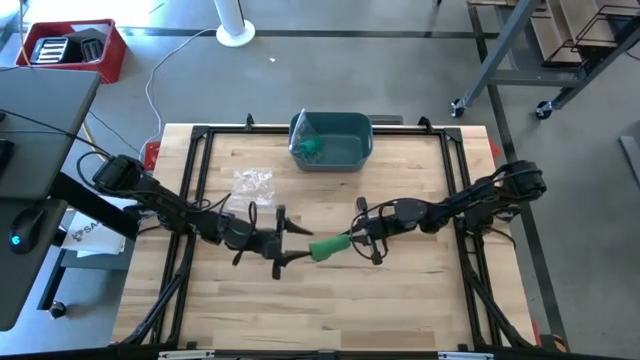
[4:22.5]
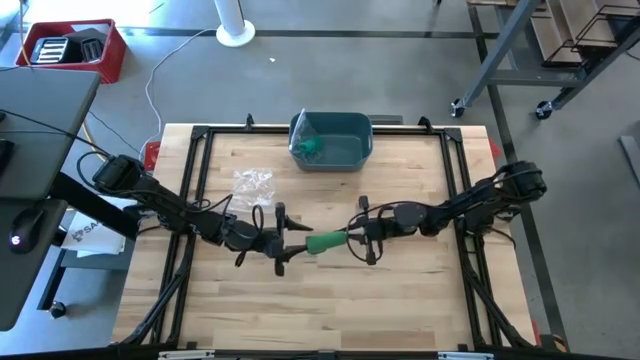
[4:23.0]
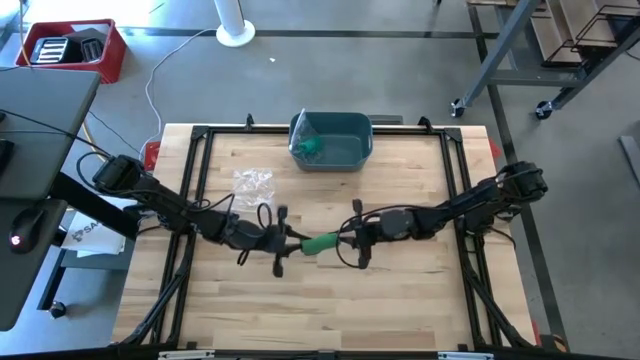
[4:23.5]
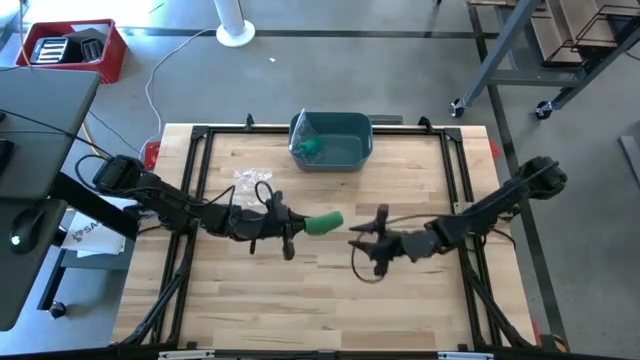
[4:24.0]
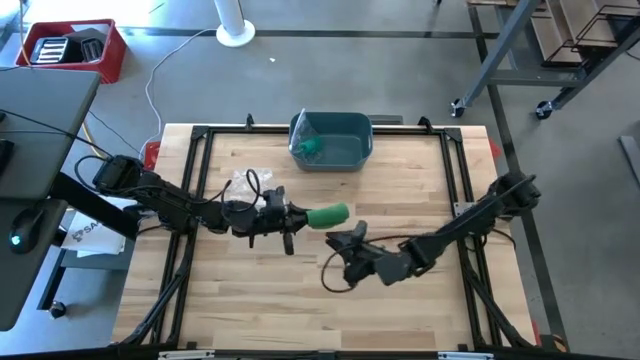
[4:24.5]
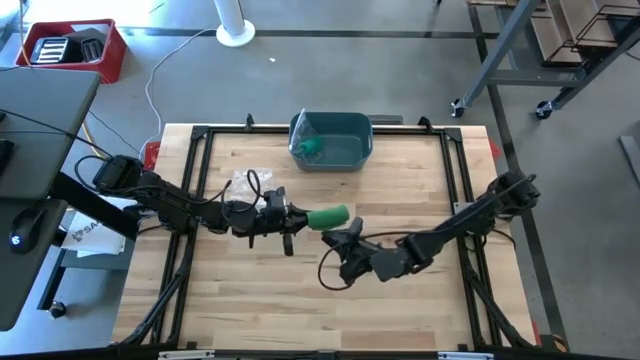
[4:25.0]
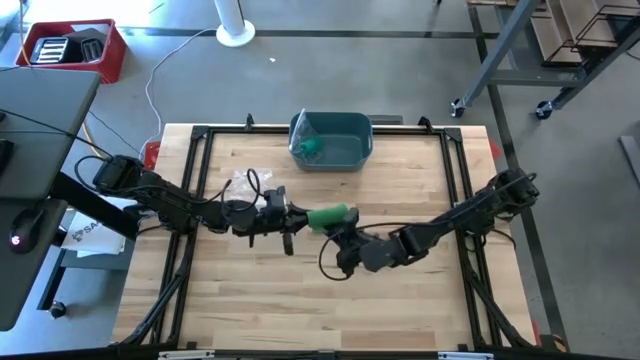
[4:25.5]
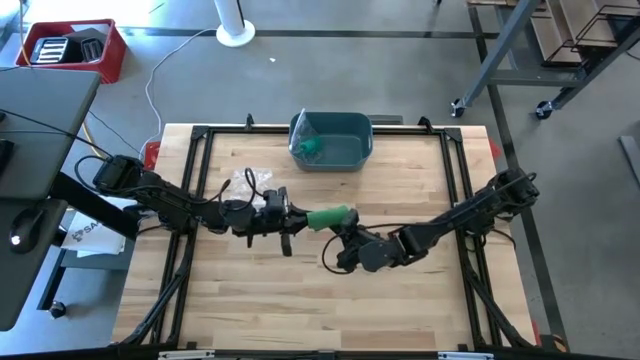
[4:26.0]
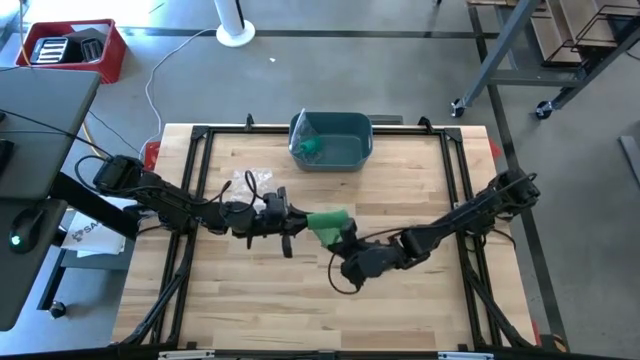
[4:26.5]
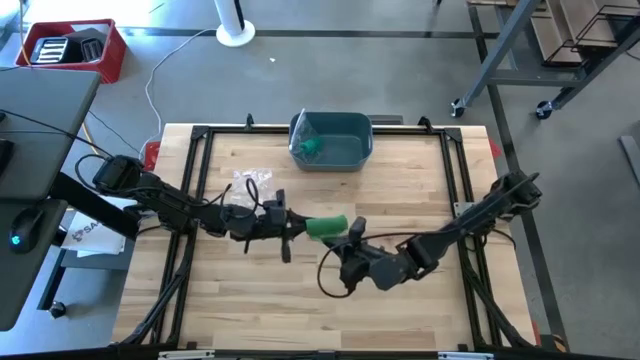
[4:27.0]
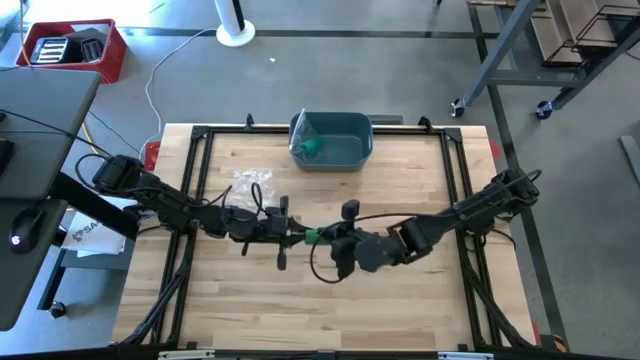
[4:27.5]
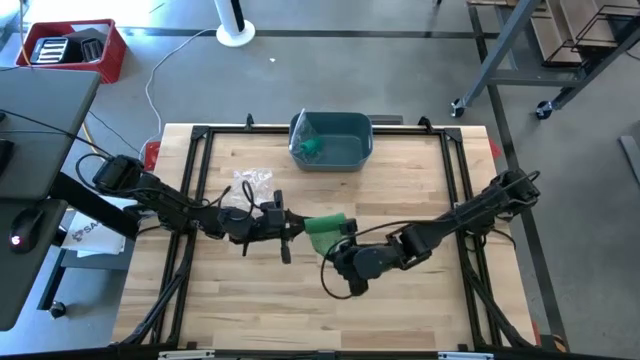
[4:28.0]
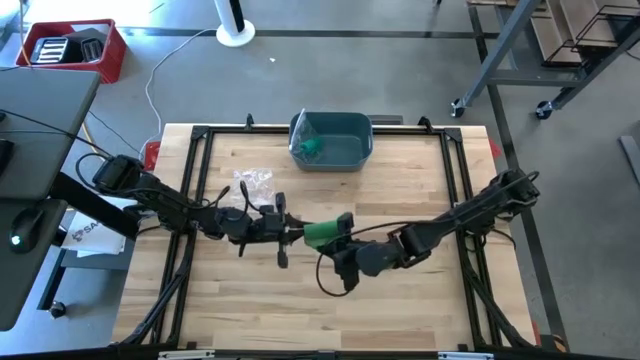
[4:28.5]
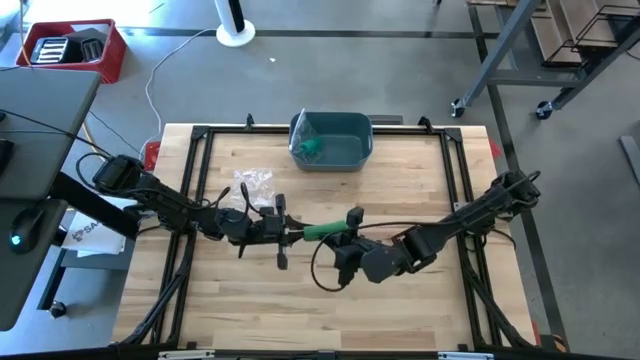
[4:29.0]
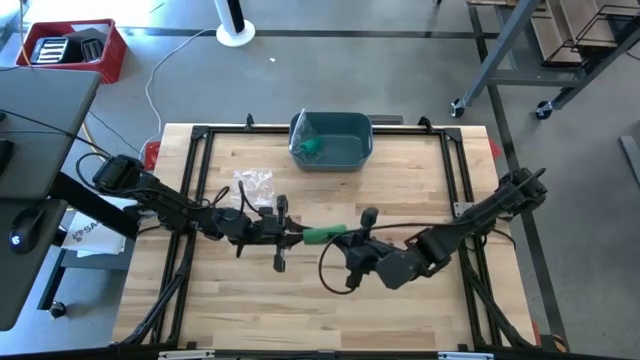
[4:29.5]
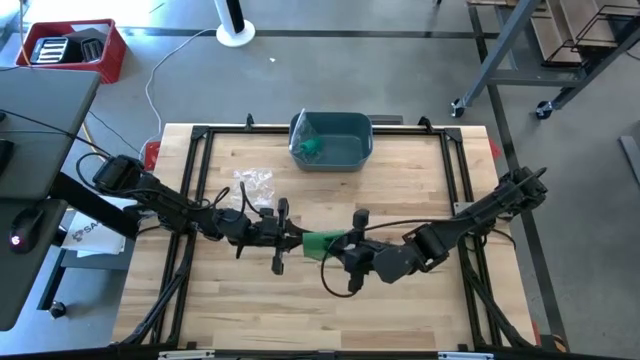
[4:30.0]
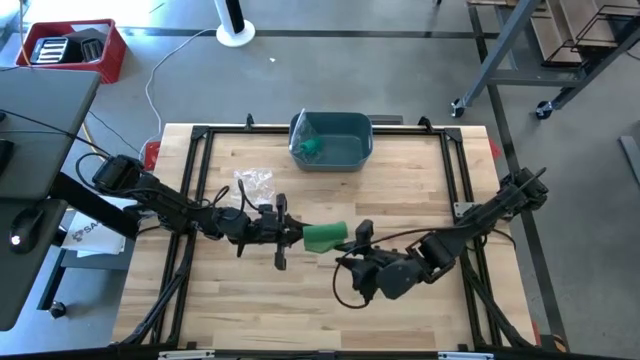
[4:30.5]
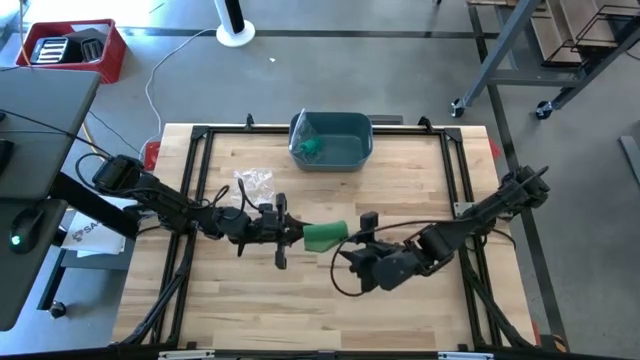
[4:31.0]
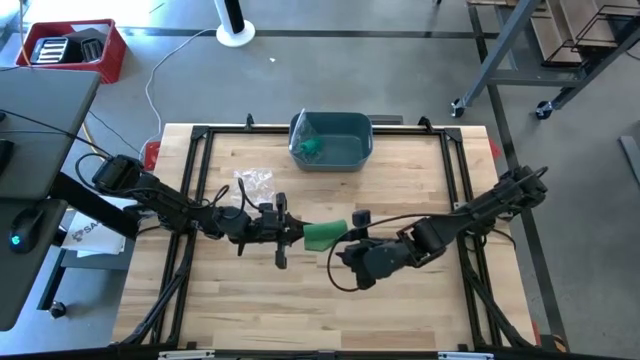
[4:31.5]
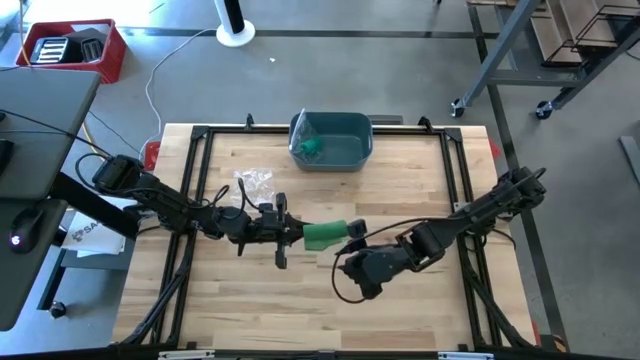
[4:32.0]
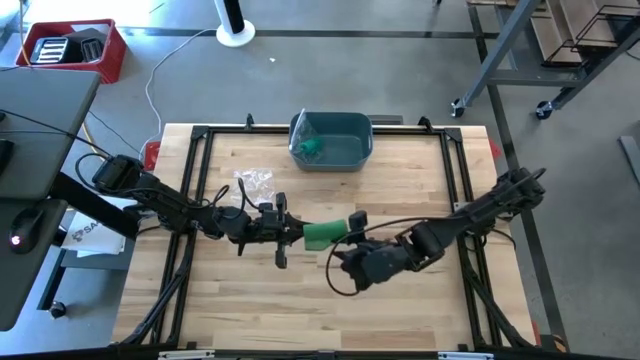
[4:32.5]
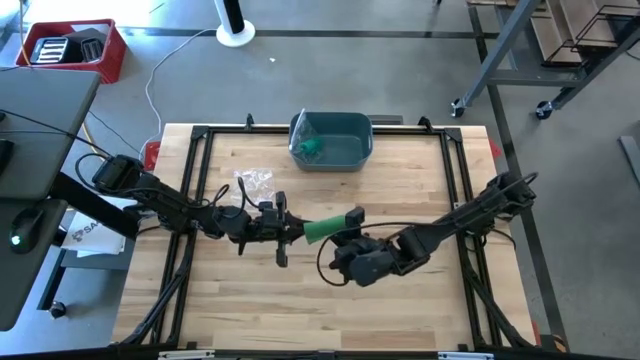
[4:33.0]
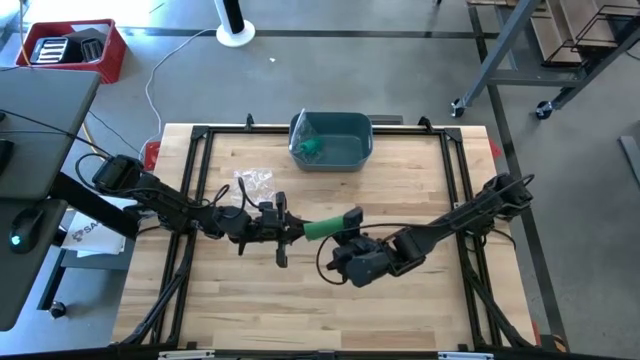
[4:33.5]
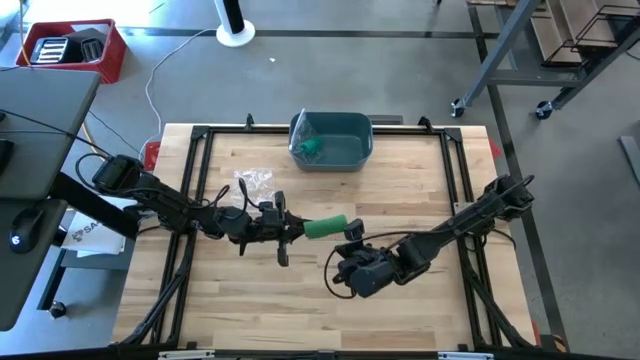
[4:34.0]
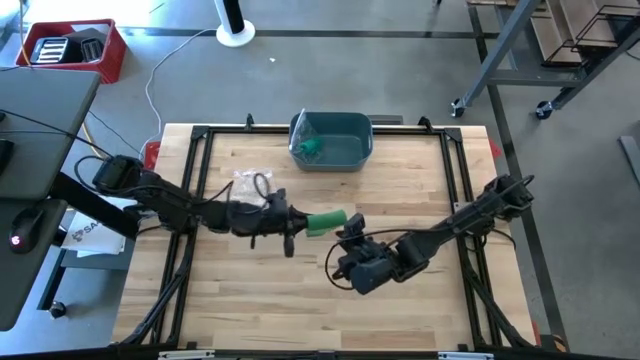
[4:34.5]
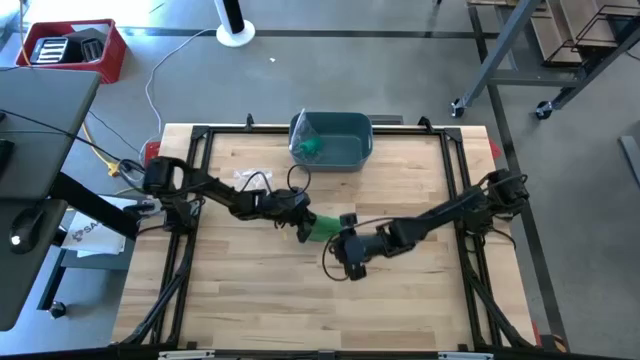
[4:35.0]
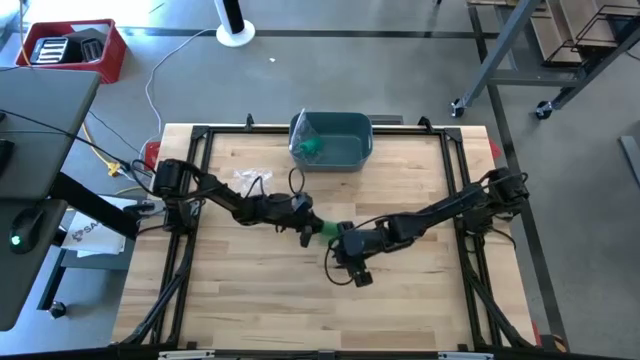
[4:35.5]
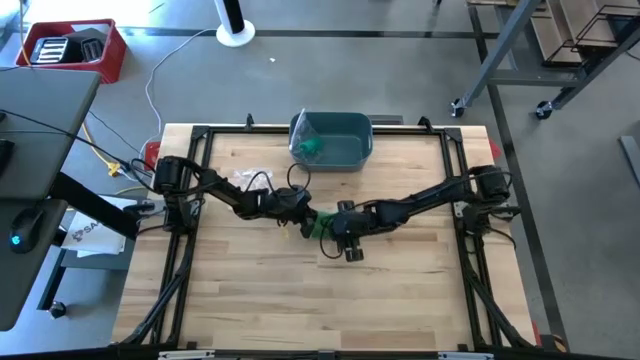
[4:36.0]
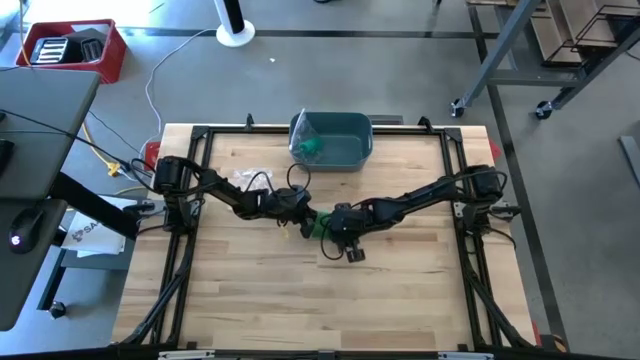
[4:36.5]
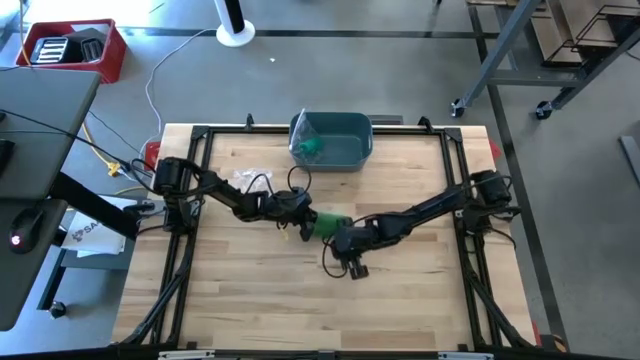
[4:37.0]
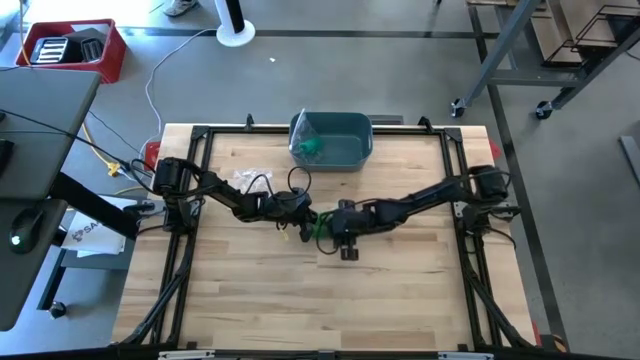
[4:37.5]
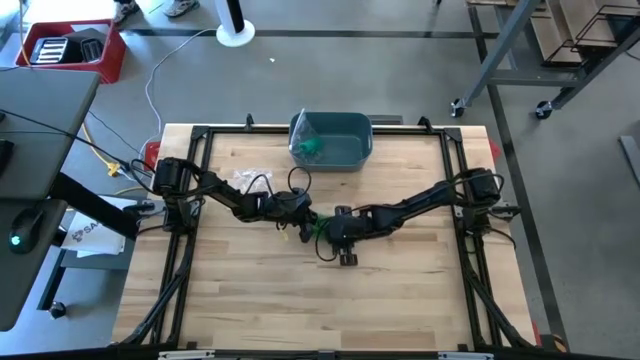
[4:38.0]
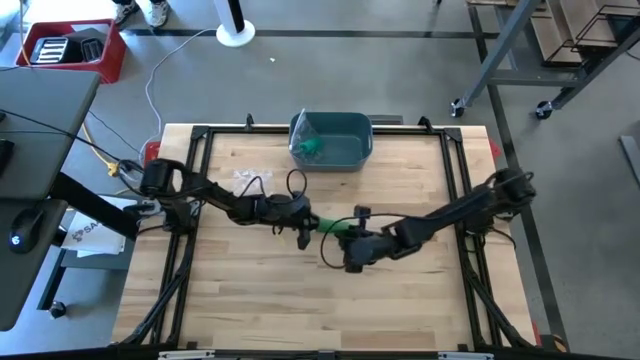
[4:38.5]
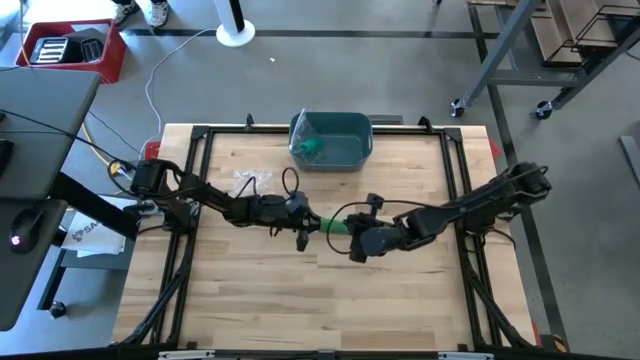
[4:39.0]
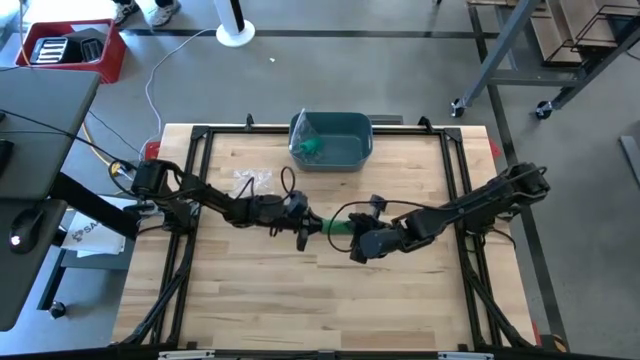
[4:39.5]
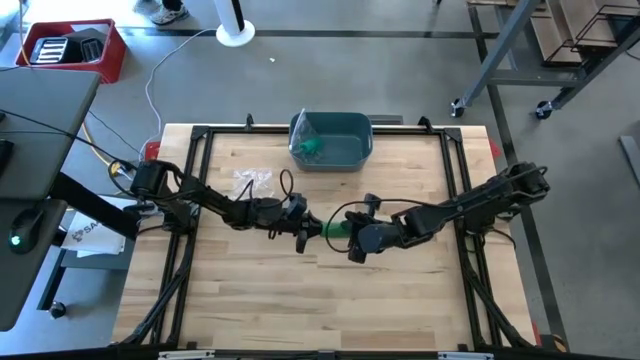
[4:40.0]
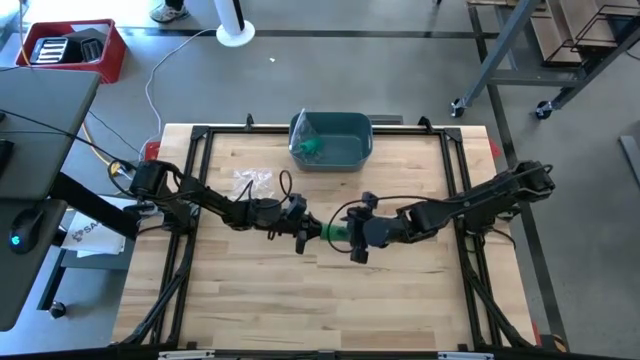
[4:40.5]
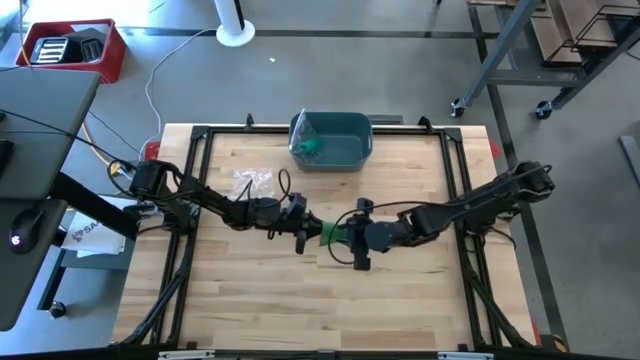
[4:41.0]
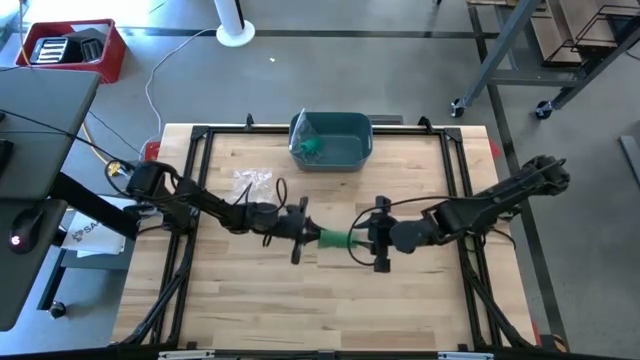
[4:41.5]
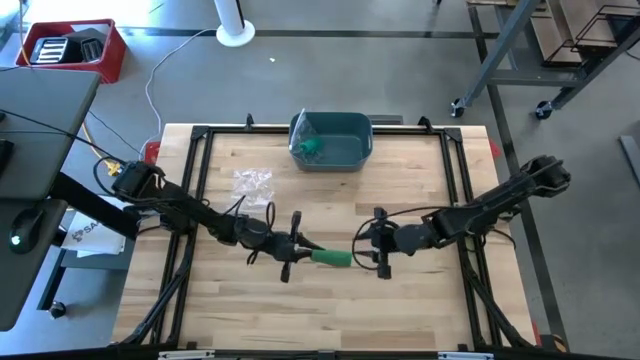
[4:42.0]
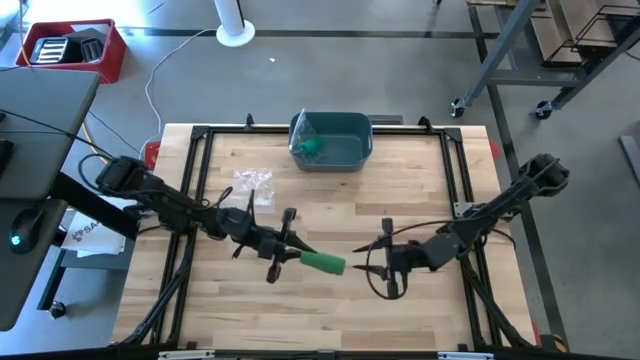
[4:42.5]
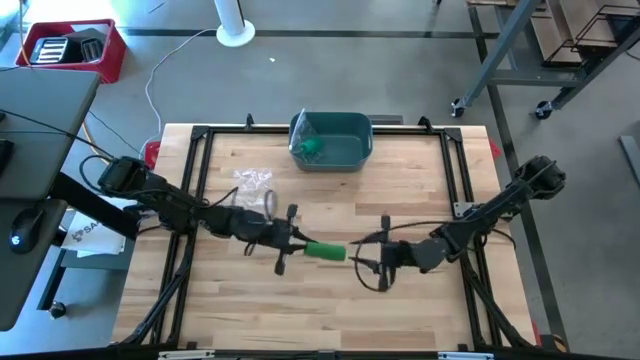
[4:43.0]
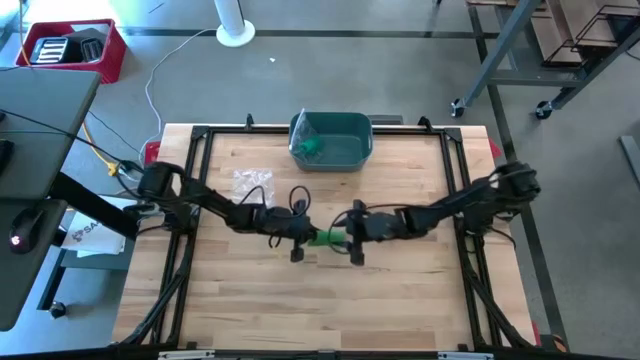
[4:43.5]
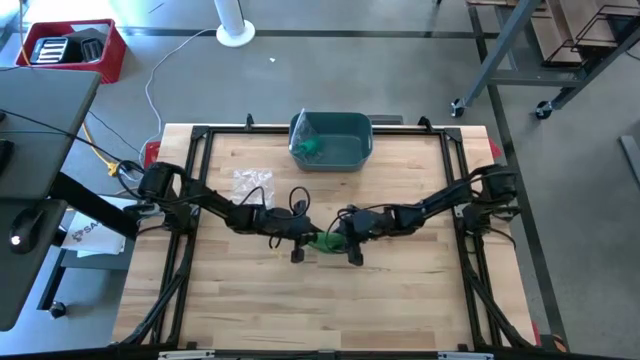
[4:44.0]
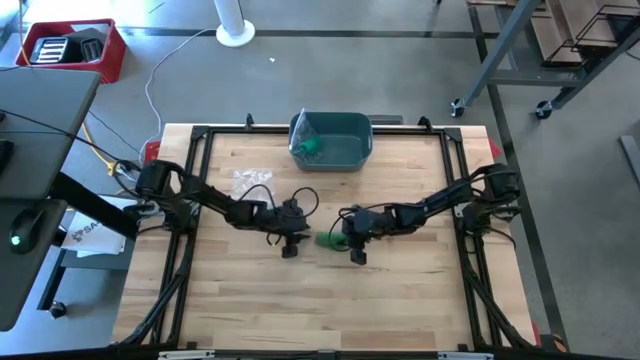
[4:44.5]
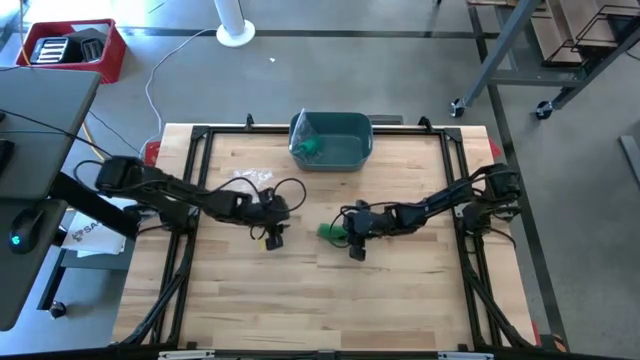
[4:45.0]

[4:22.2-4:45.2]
Task: Roll bandage
Roll the green bandage
